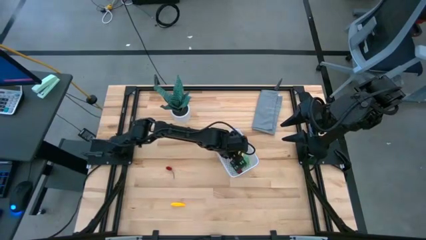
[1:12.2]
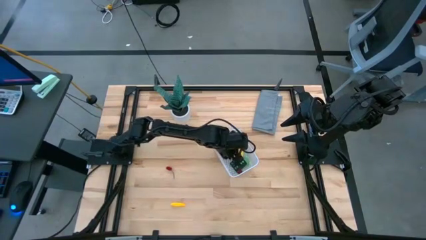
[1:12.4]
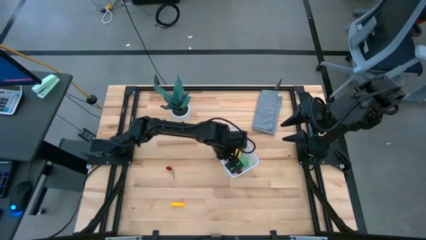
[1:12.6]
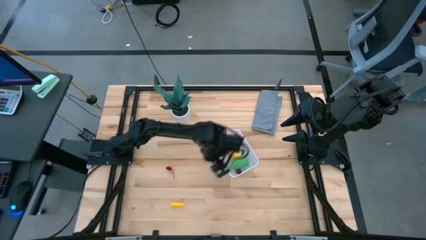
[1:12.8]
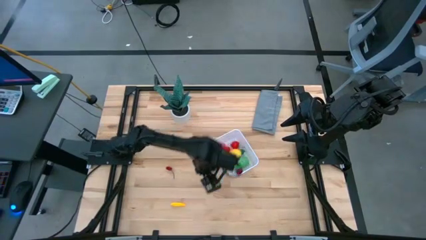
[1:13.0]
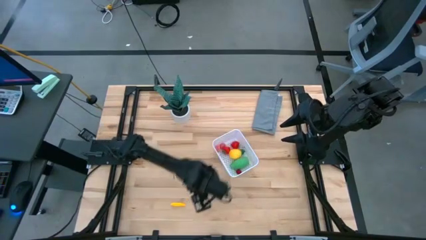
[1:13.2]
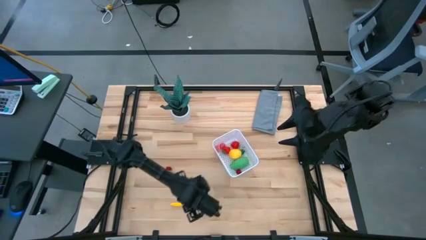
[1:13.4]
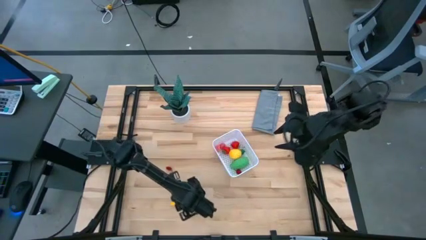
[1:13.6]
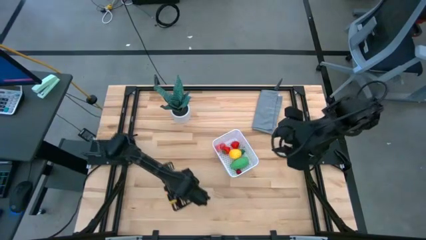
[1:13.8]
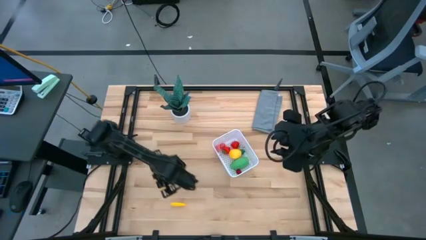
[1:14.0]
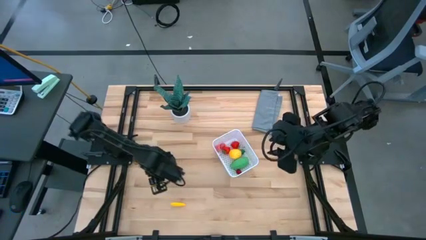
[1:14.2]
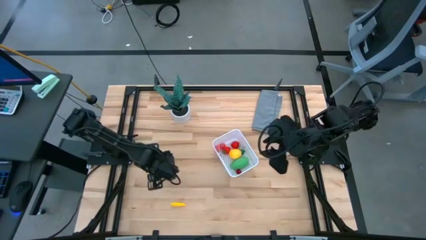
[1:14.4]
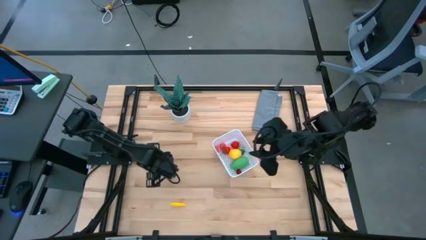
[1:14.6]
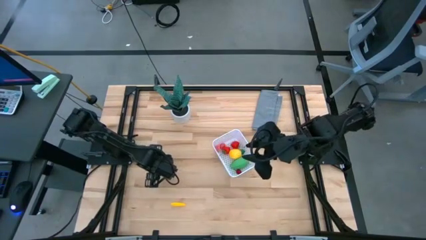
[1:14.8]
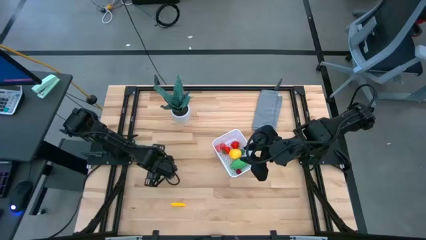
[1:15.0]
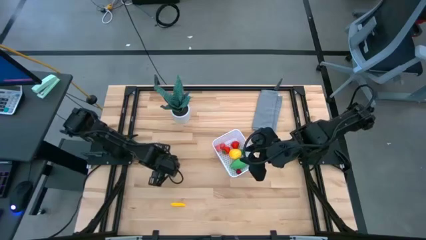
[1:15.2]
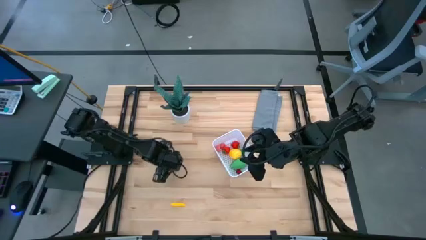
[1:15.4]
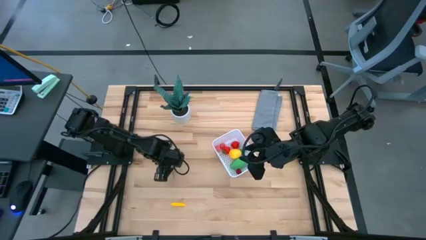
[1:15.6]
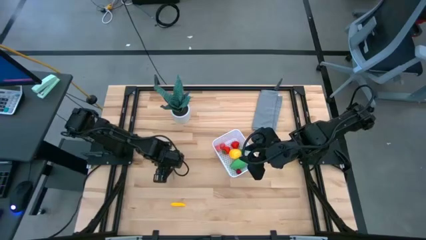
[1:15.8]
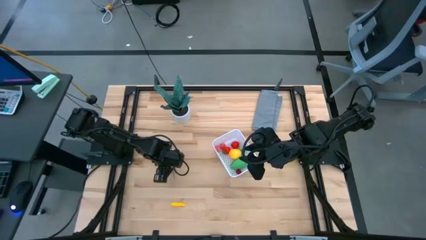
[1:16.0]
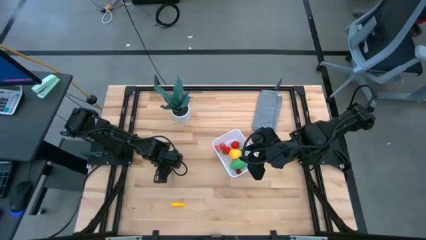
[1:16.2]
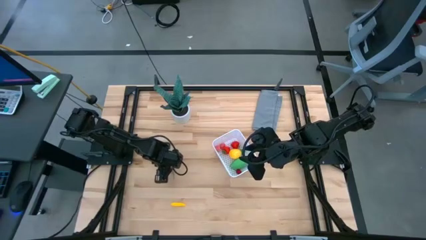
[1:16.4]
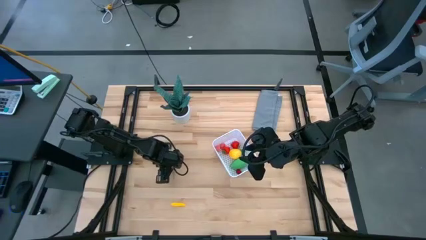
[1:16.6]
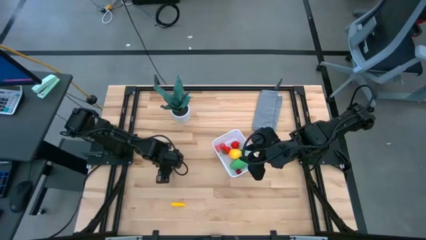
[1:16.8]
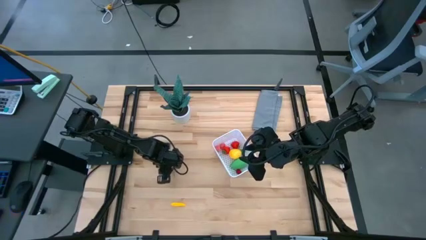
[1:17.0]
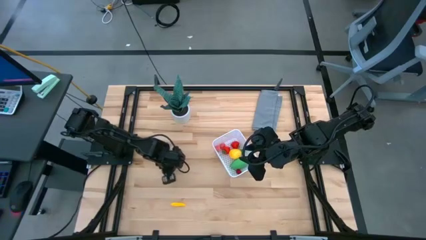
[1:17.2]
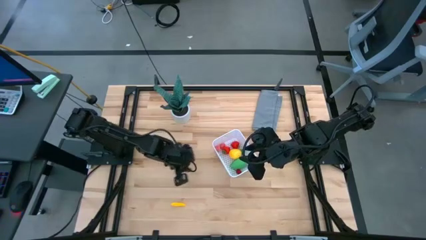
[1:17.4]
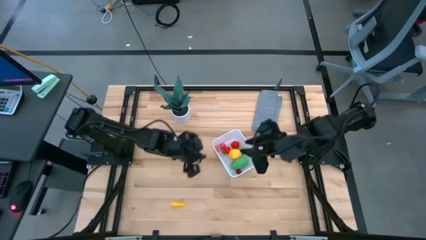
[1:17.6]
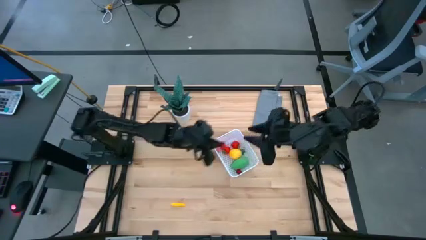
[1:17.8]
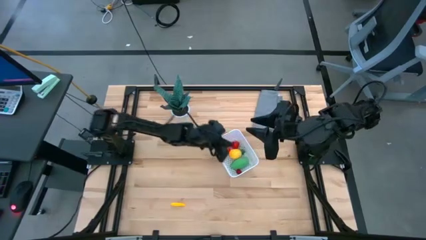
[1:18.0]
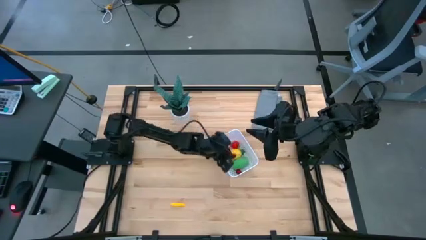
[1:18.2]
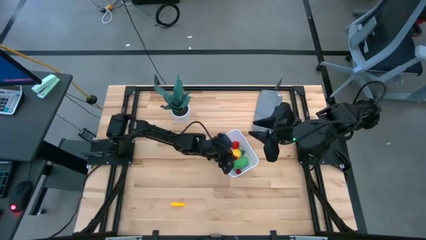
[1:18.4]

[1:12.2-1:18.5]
Task: Pick and placing Produce into tupperware
Put the red cherry into the white basket

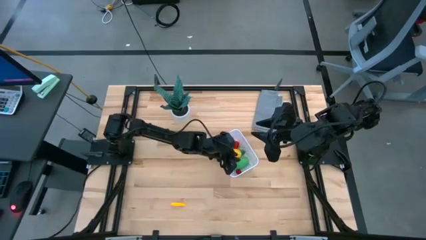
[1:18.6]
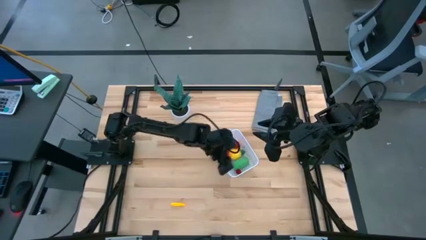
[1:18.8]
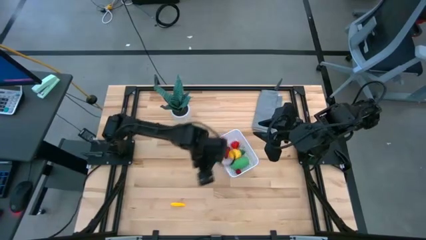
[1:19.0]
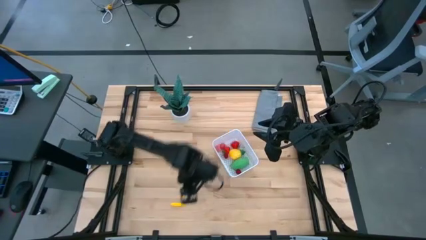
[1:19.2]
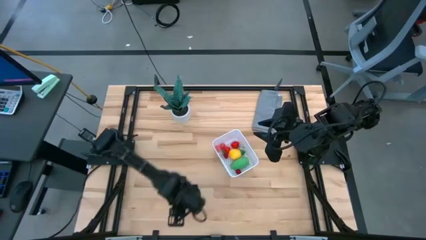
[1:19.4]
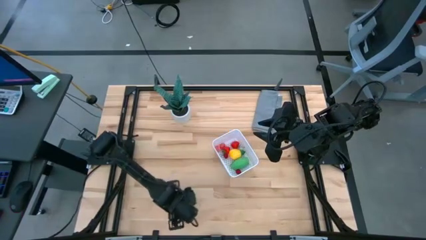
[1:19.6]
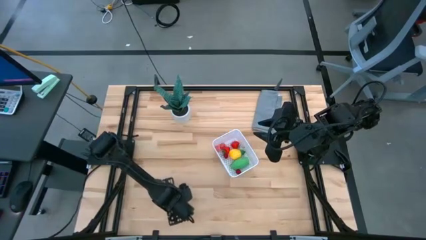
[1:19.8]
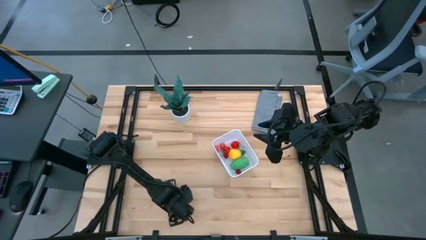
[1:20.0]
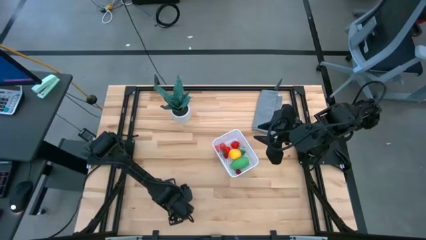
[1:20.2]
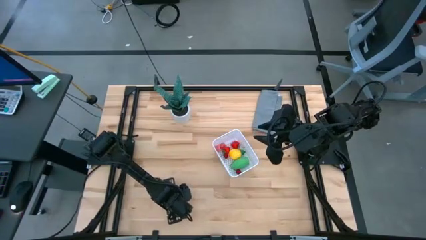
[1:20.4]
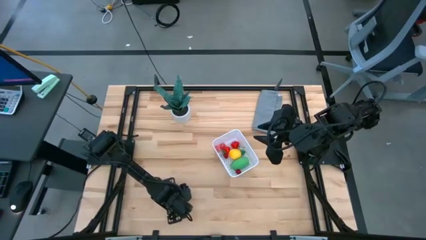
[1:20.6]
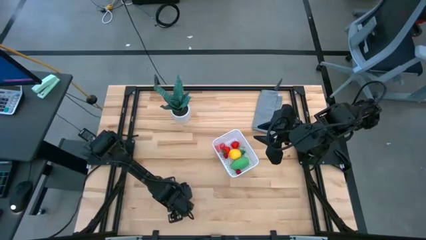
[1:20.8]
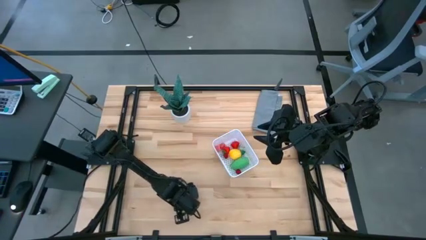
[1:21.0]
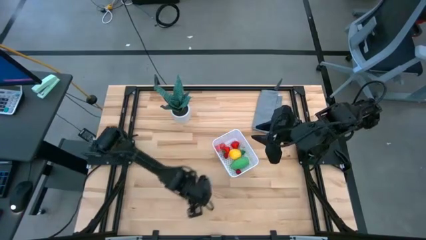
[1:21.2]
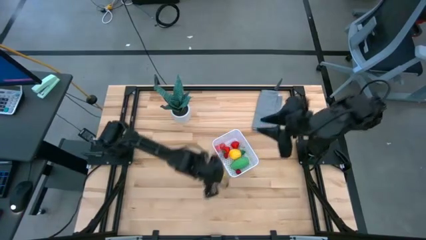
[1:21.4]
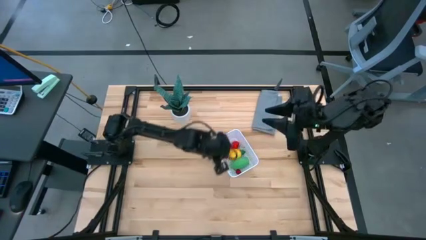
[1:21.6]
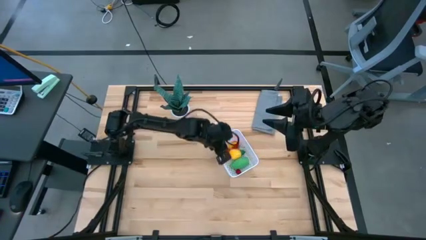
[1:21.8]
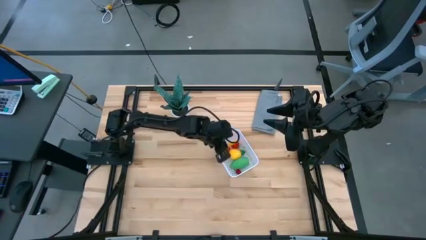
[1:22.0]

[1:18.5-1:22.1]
Put the yellow corn into the white basket

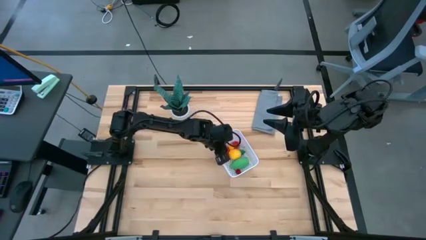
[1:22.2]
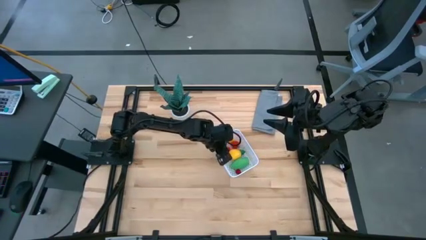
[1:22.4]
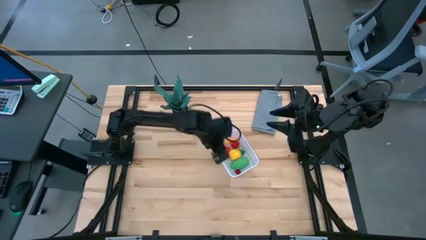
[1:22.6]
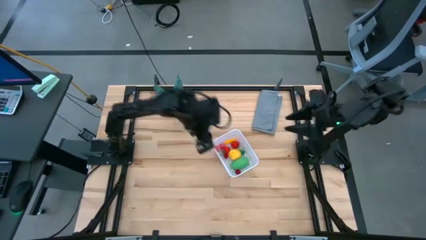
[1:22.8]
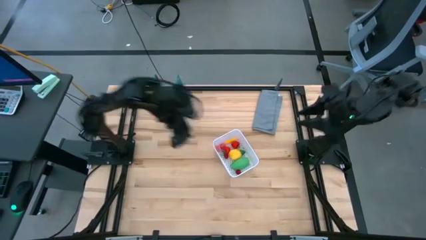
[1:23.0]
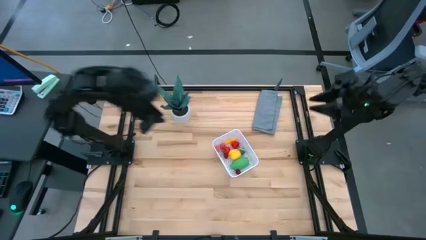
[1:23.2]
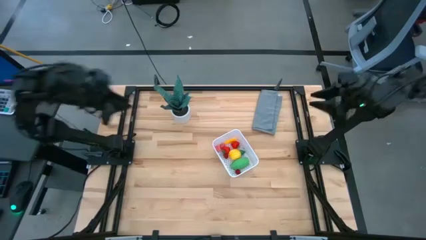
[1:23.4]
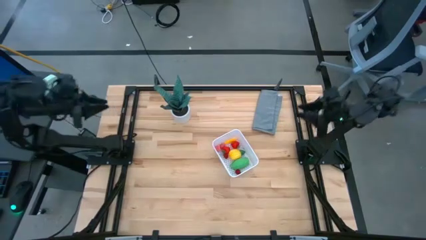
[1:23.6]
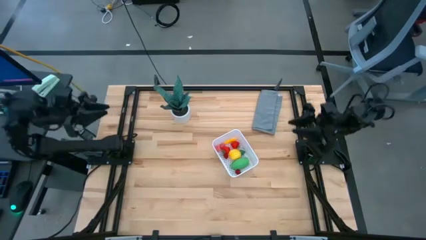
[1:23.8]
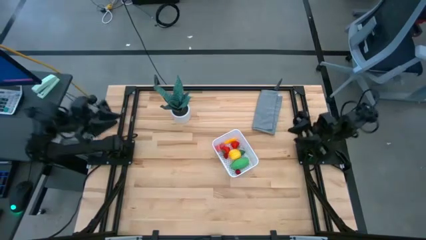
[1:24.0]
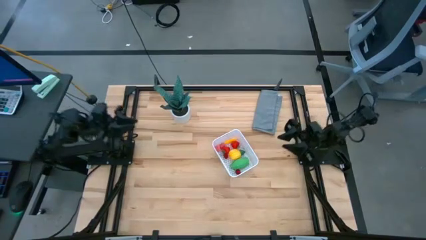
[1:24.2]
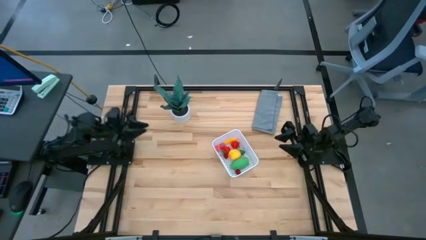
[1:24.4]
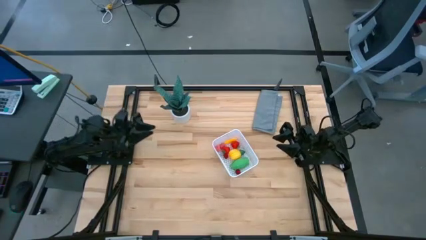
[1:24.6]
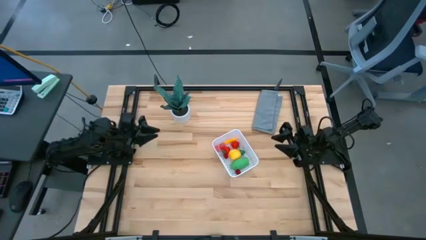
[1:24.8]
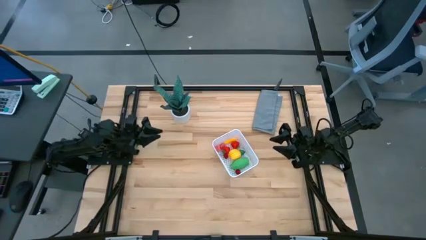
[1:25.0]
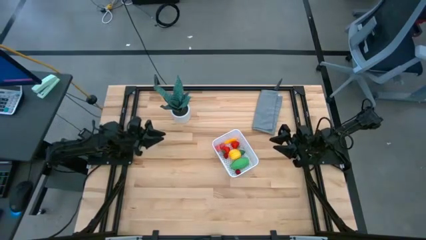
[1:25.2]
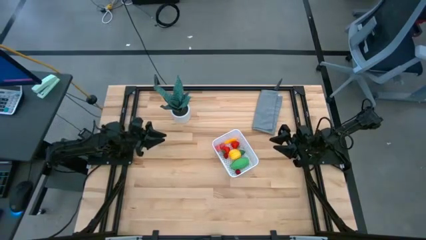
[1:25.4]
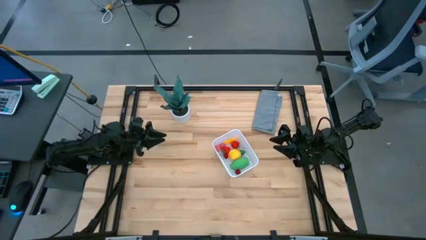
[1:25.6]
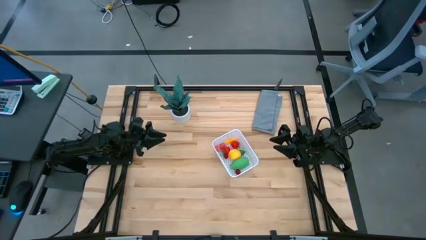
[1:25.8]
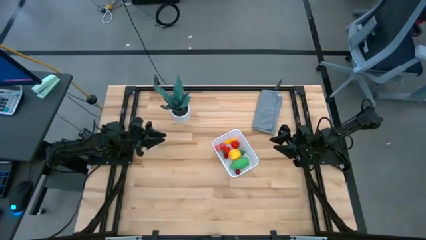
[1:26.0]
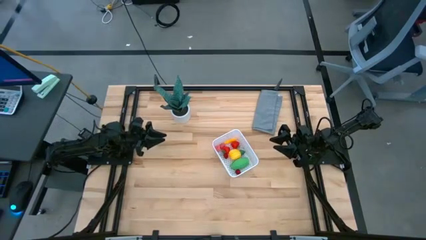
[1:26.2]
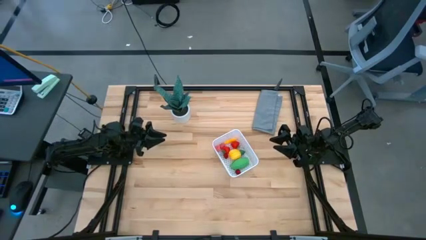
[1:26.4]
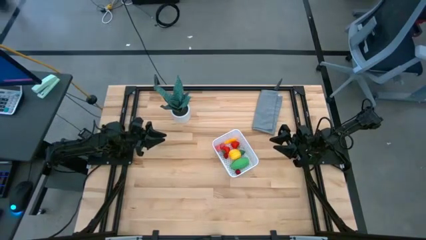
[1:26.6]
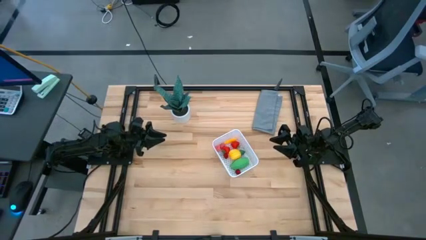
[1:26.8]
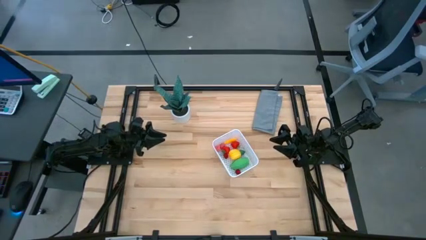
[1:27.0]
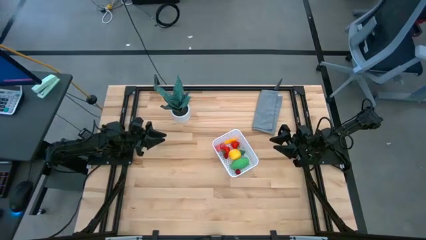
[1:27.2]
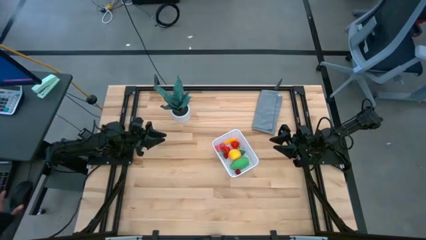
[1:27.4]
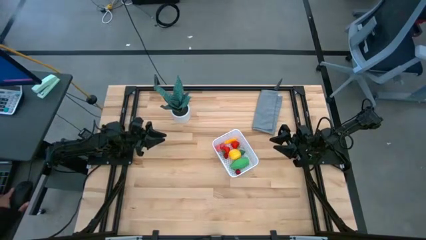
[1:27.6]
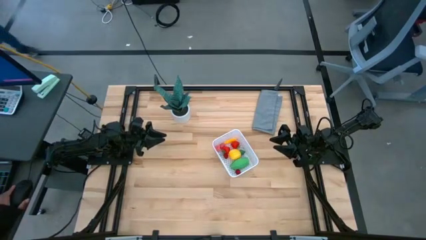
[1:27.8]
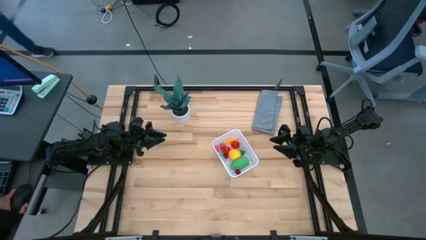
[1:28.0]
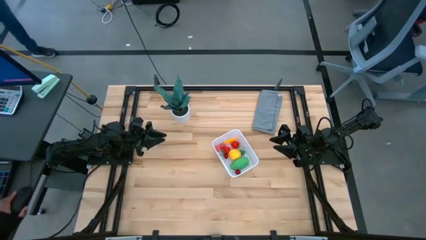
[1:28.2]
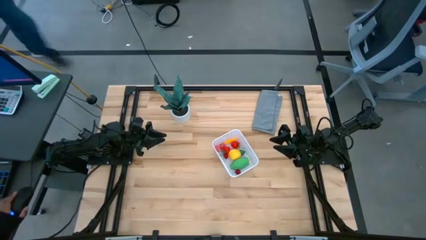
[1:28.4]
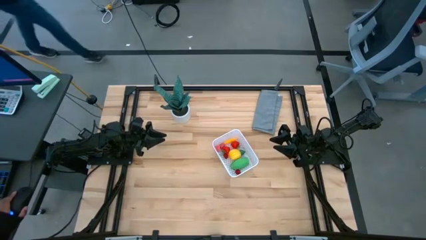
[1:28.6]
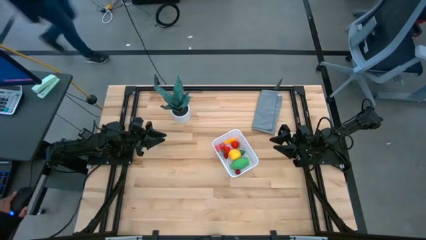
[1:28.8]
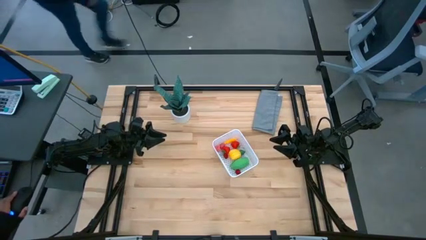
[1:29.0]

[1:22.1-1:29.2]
Return to Home position
